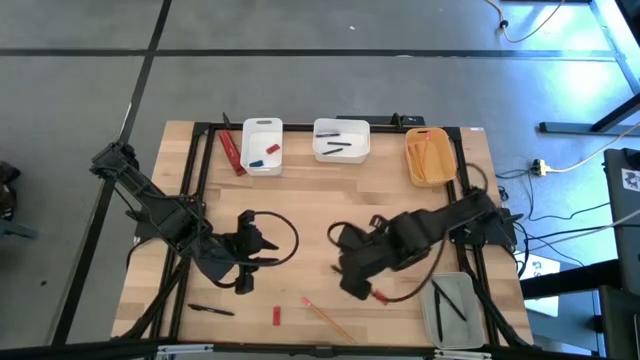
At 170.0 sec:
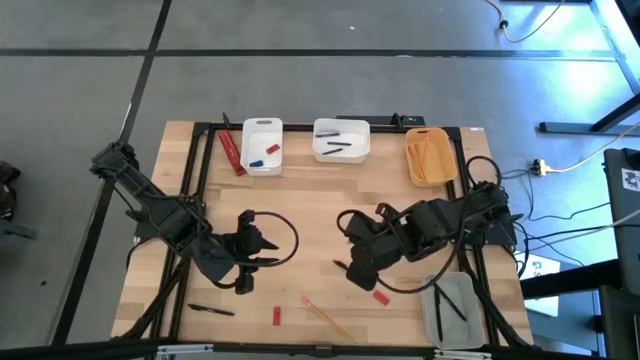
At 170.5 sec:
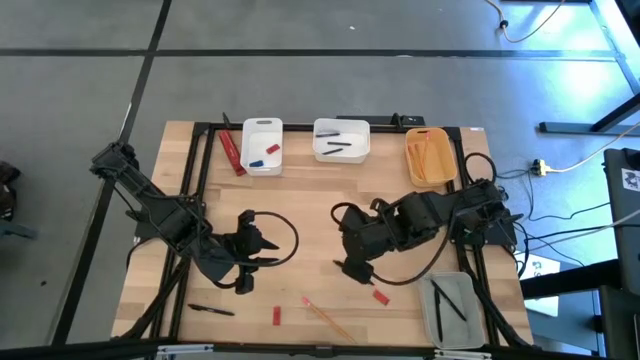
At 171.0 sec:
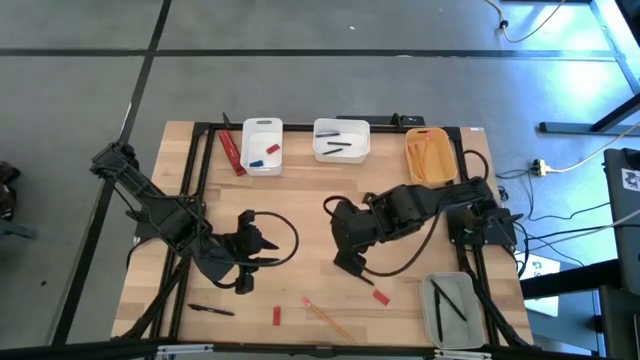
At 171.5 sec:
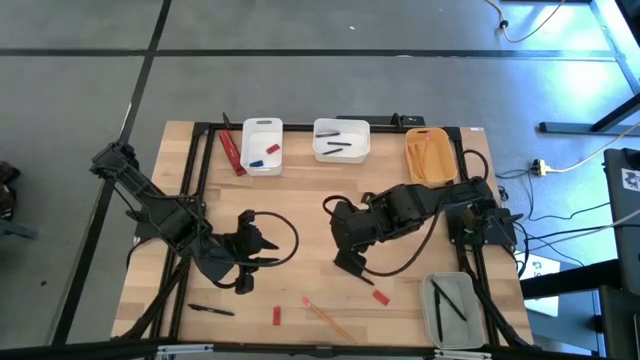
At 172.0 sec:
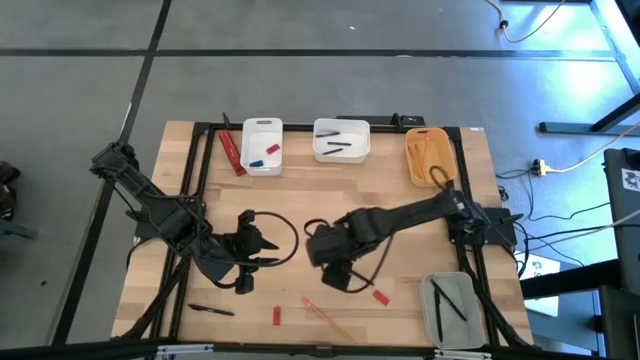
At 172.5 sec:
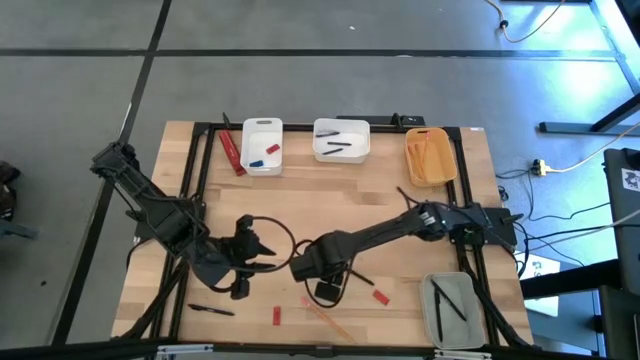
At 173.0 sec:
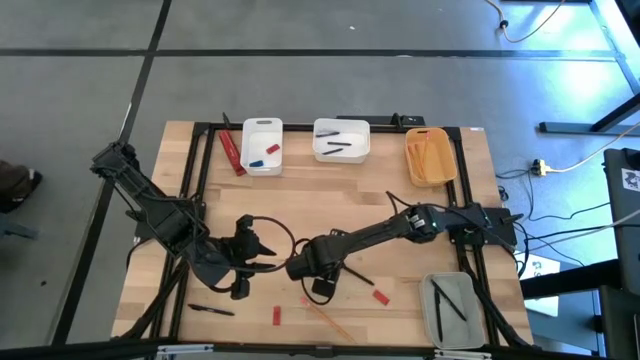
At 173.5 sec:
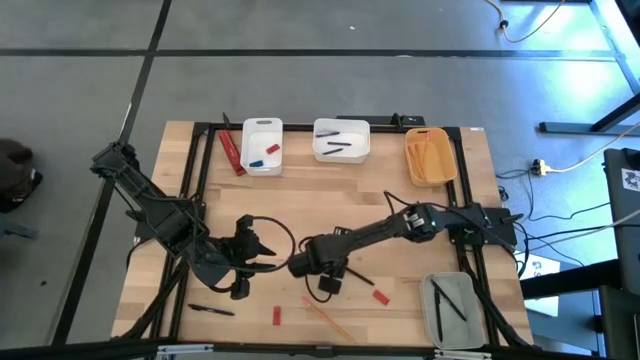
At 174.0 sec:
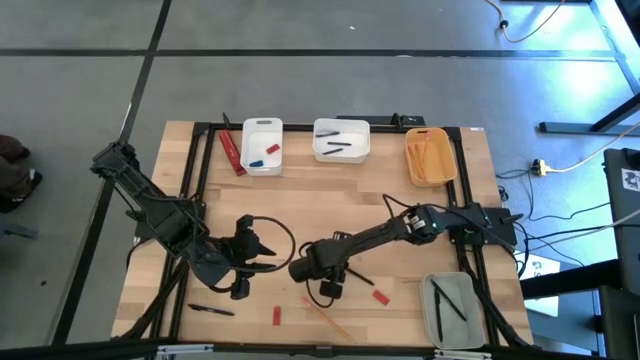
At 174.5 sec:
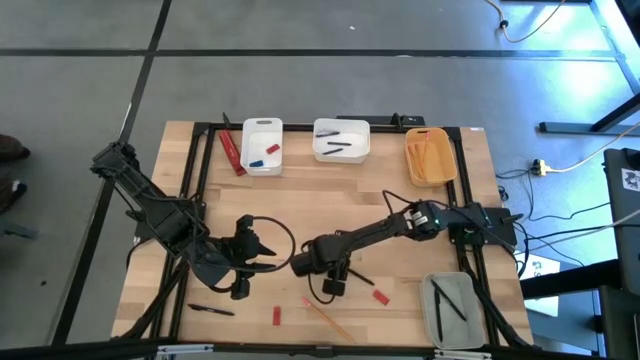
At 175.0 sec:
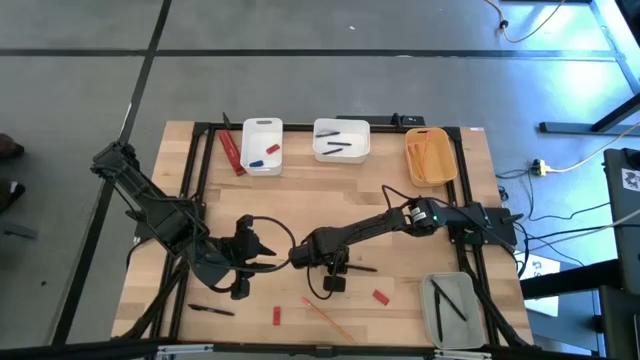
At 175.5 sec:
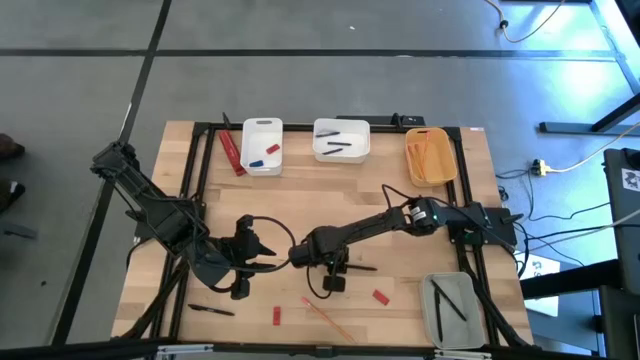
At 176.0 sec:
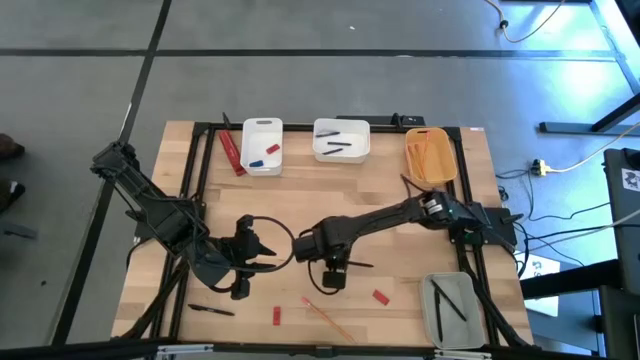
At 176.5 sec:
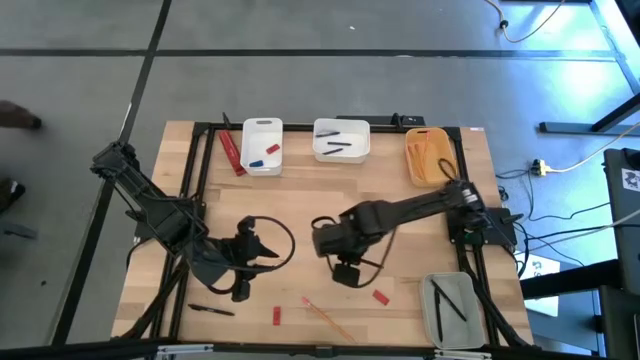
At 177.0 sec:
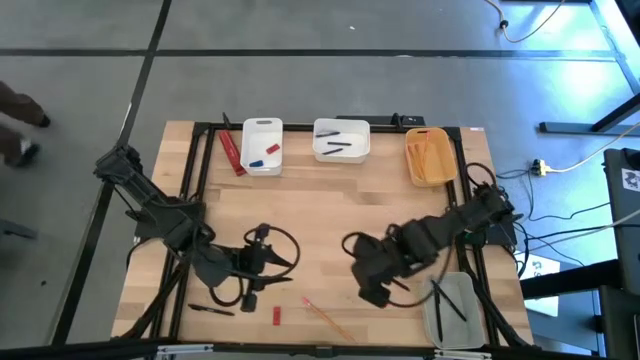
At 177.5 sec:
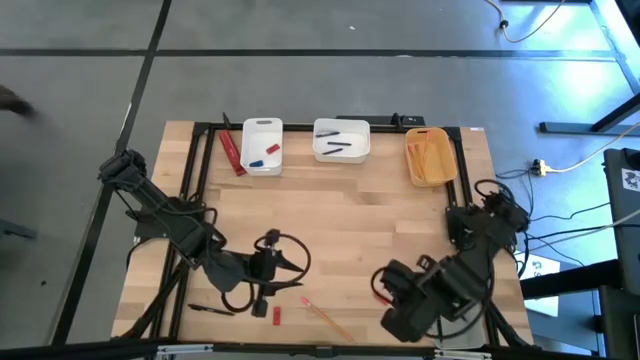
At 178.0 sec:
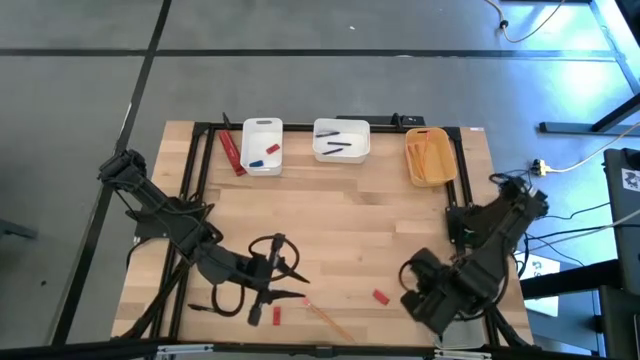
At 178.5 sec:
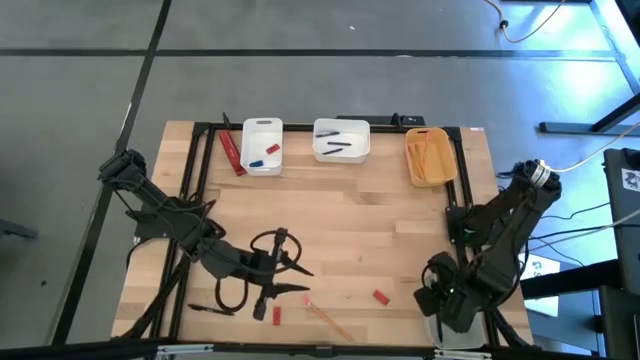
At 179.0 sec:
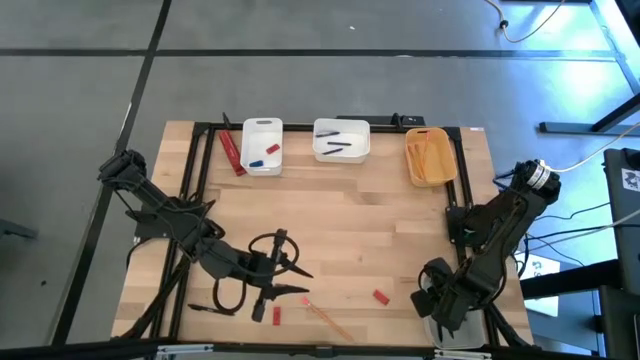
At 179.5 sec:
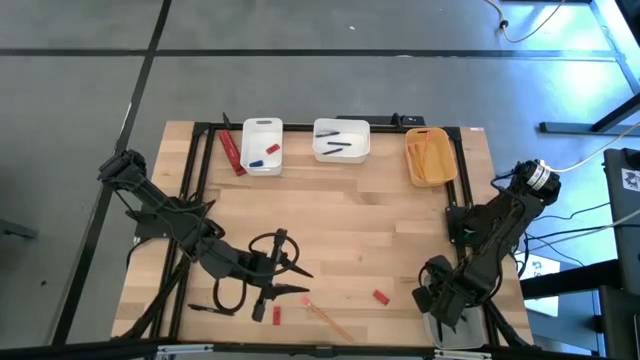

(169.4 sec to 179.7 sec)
Task: Sort crayons/erasers/pens/pencils in bins
Put the black pen into the gray bin

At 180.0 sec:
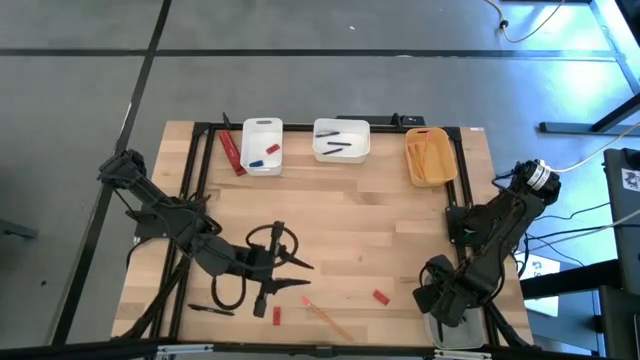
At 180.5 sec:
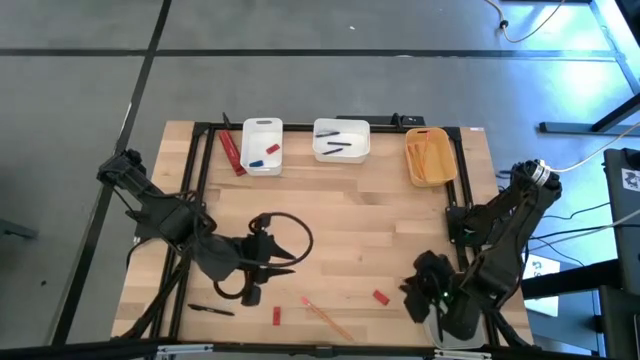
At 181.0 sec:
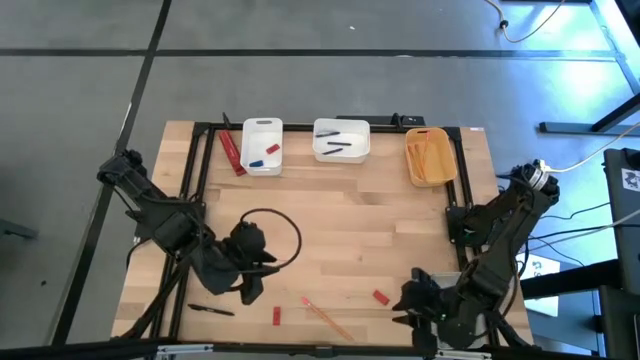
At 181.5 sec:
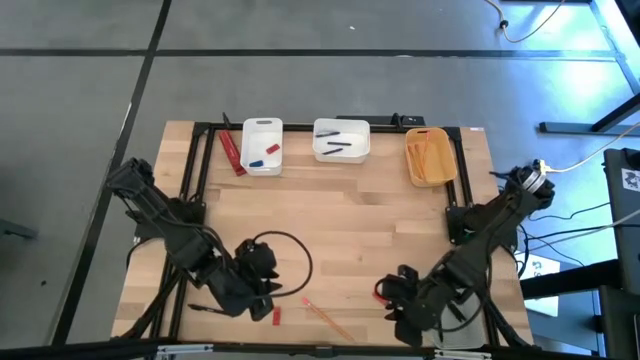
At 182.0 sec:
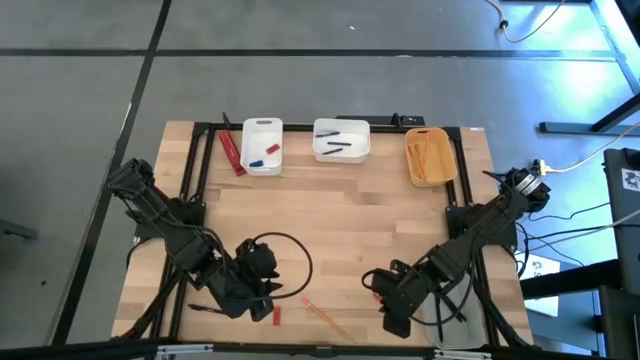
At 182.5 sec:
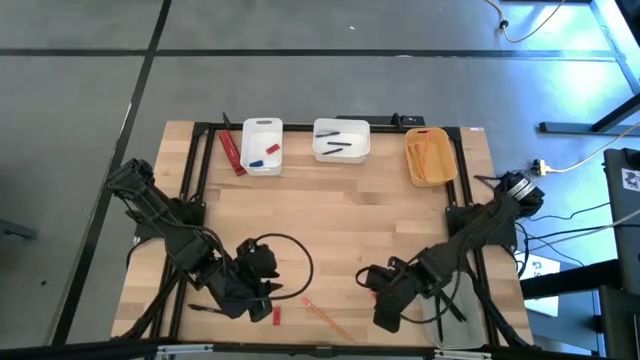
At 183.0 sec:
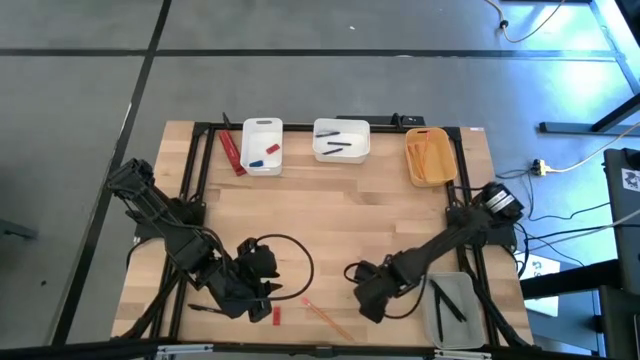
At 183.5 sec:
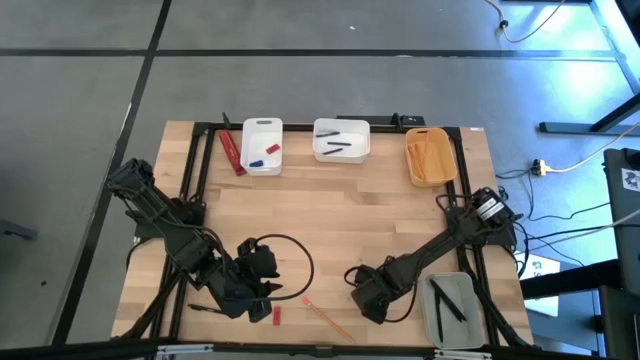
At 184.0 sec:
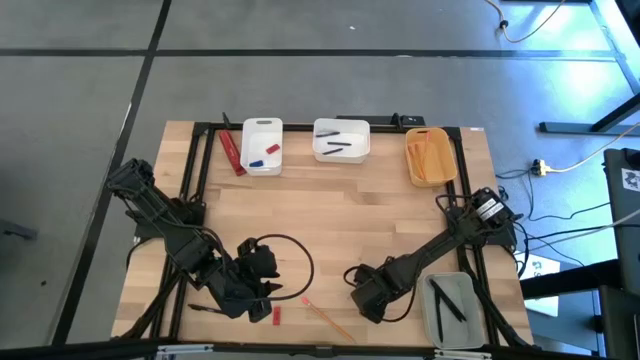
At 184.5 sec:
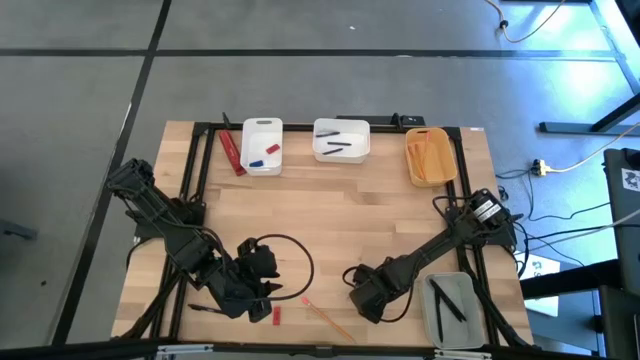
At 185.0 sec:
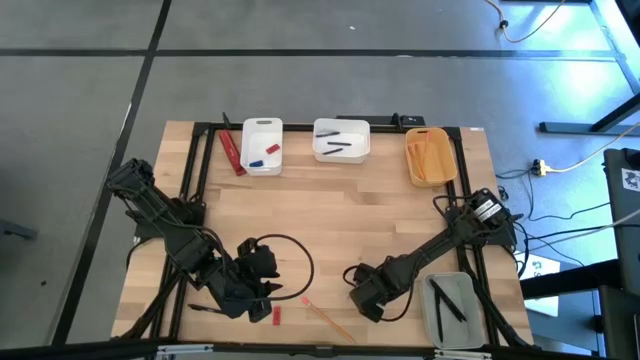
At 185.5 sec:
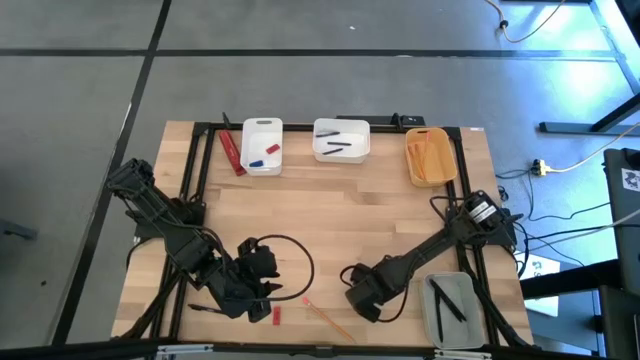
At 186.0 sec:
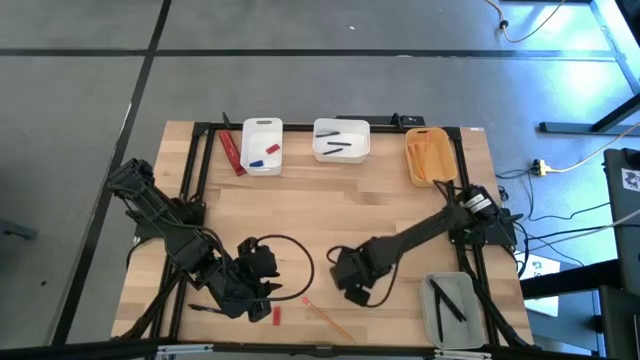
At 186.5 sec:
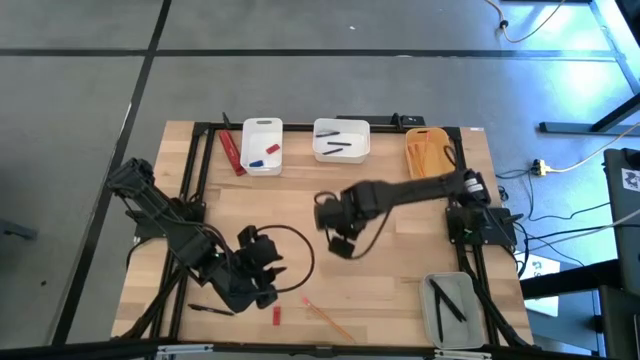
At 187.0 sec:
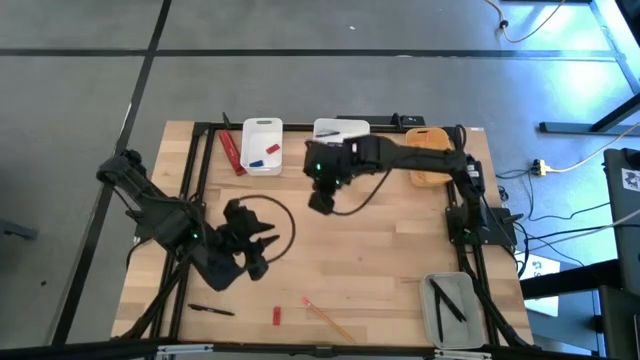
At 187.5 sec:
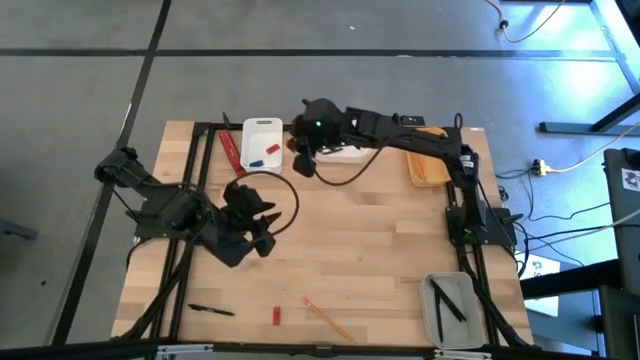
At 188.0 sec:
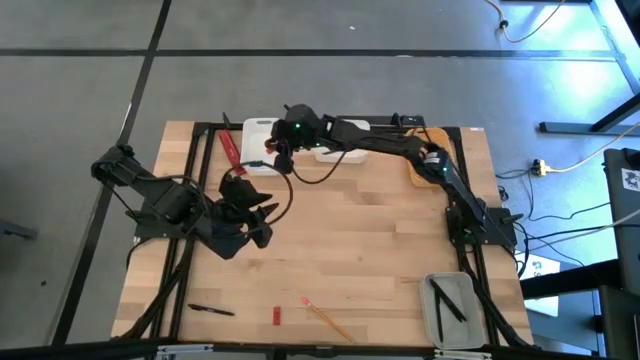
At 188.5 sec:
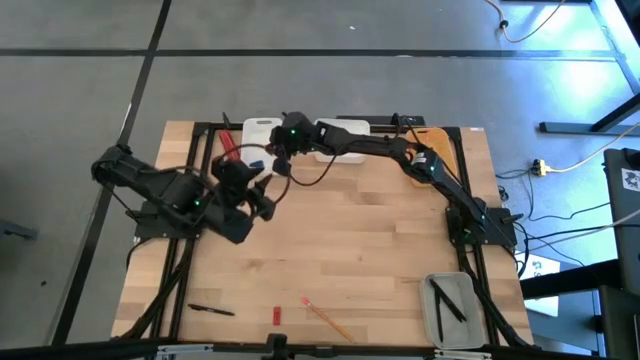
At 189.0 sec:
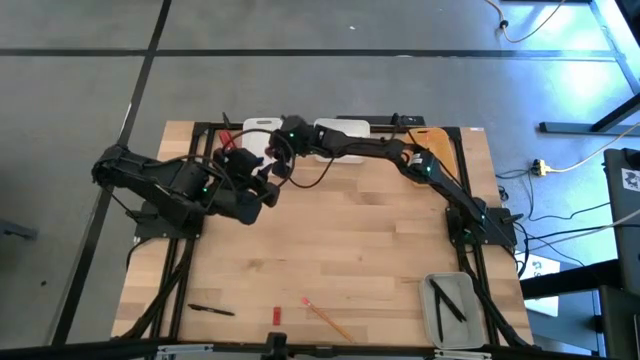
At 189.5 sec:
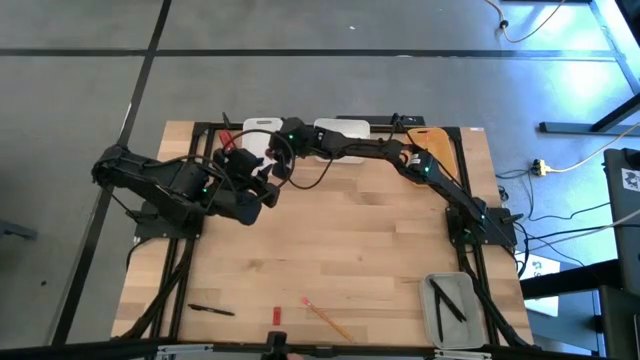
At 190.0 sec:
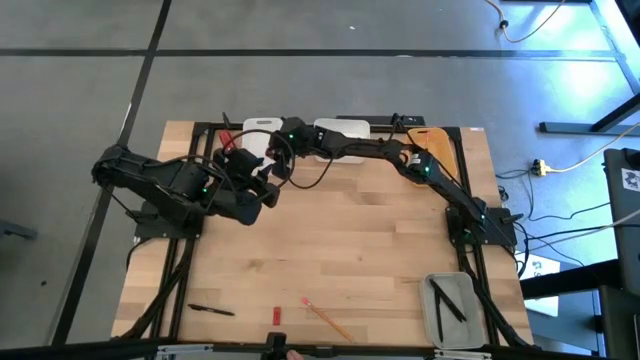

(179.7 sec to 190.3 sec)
Put the right red eraser into the left white bin
